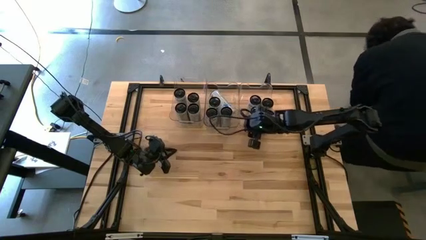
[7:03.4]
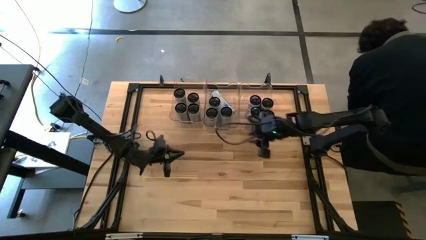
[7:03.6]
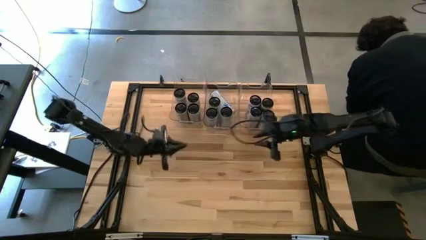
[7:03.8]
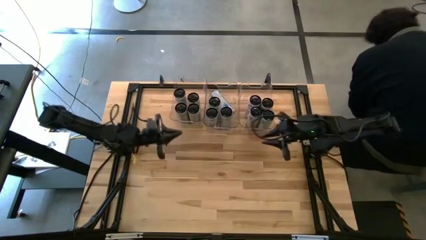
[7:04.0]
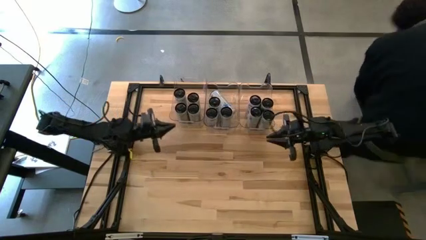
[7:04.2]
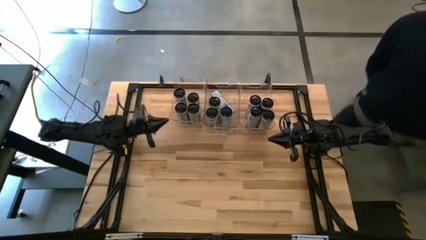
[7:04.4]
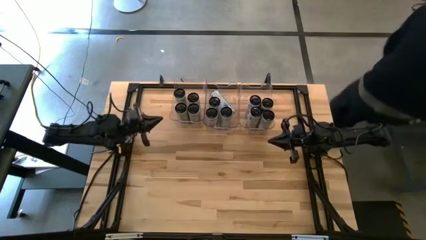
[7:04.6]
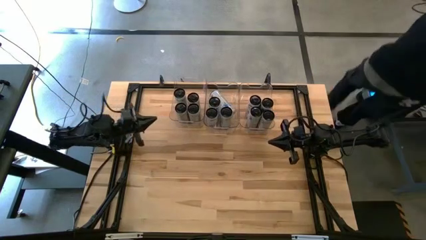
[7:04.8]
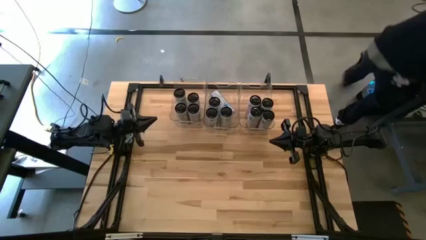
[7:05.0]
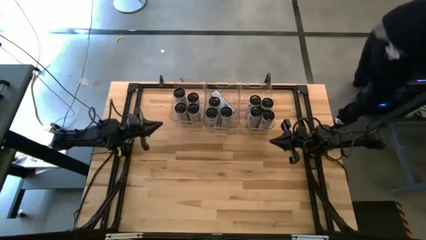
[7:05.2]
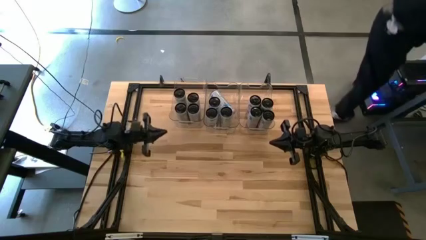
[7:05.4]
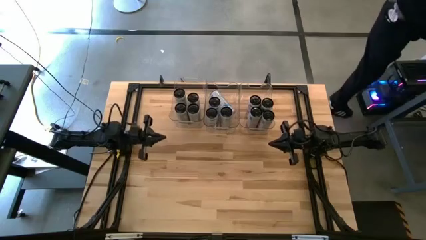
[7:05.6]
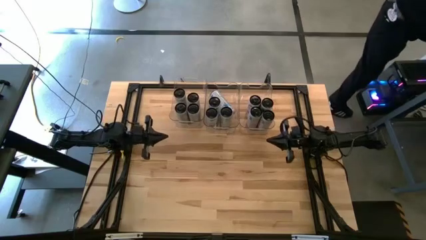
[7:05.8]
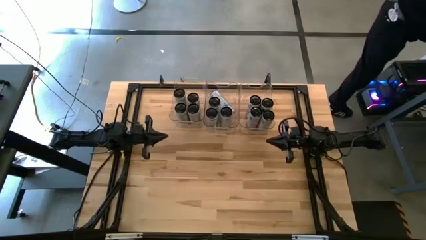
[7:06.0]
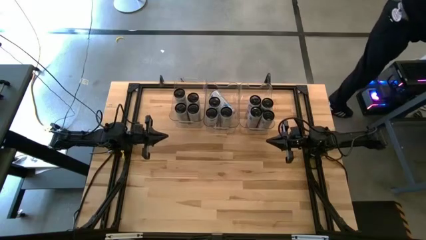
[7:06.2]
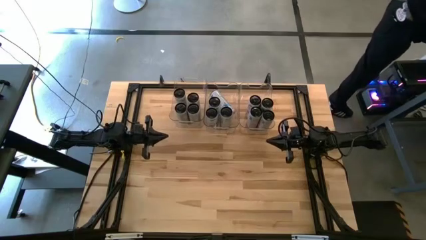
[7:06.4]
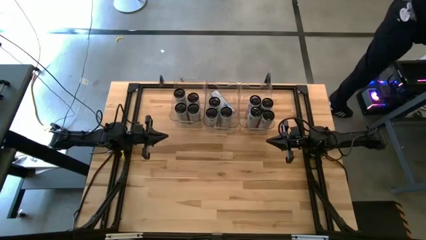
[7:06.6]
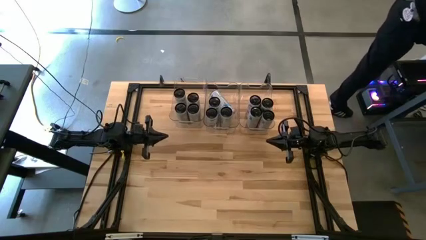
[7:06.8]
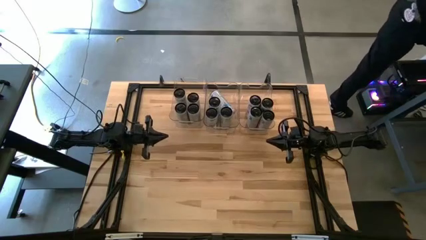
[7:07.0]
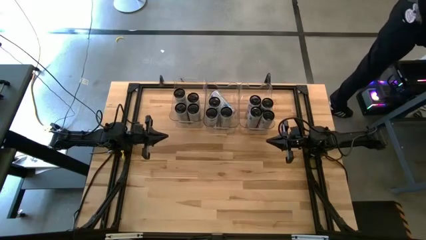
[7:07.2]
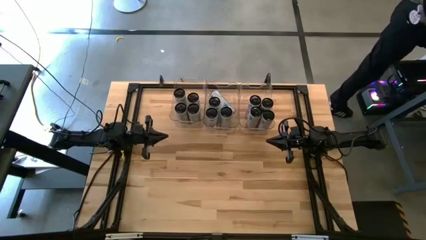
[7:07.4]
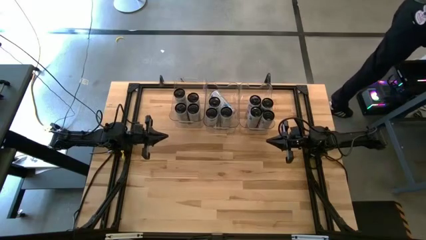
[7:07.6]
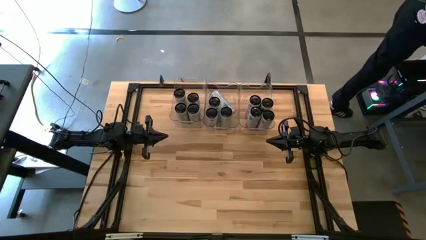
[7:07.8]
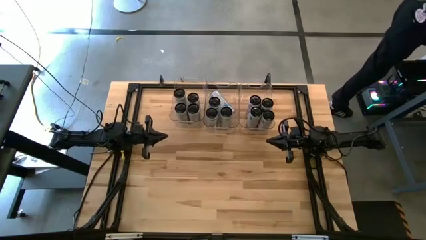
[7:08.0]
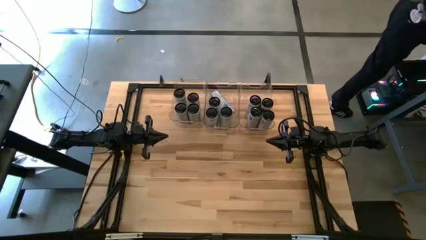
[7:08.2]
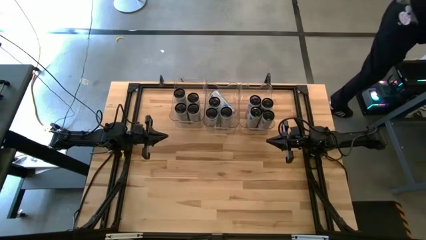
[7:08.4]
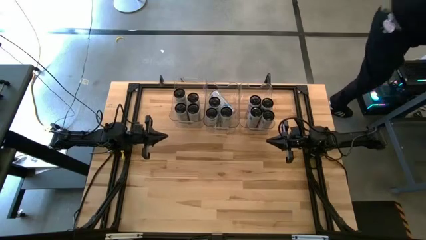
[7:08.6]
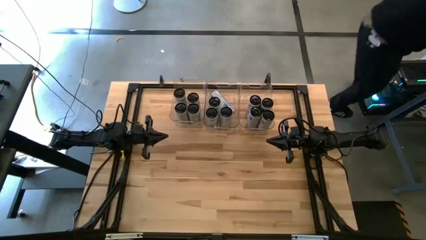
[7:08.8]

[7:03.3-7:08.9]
Task: Sort soda cans
Return to Home Position
